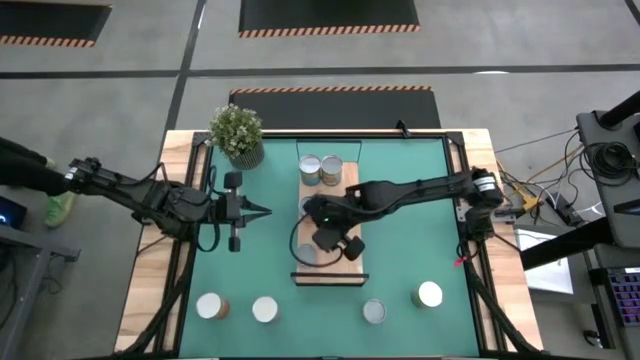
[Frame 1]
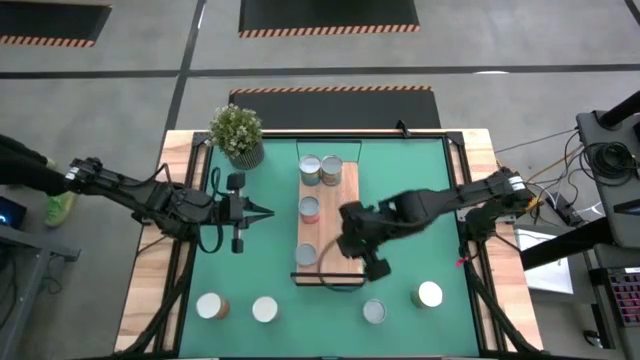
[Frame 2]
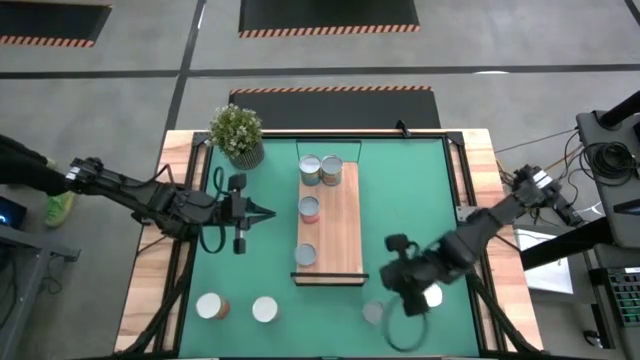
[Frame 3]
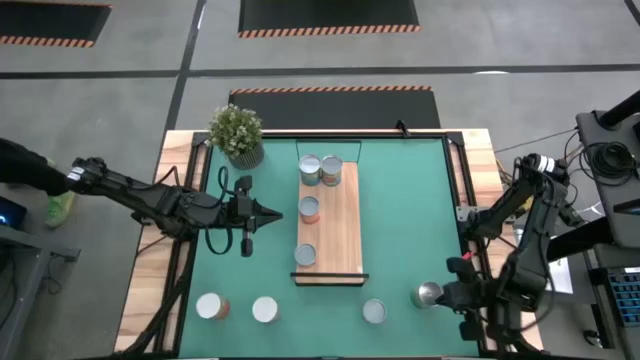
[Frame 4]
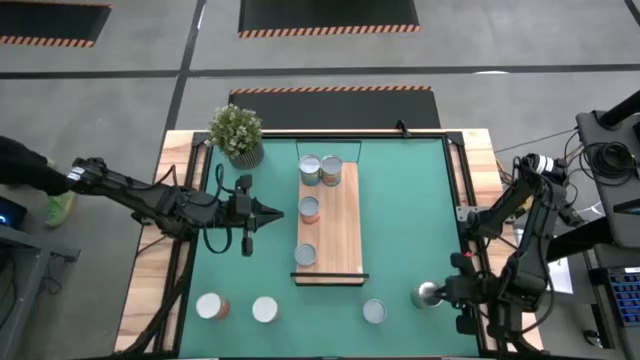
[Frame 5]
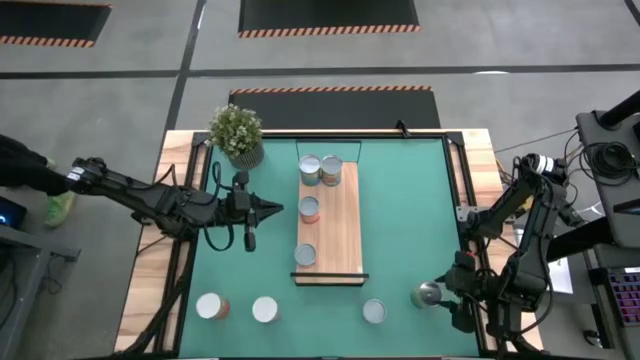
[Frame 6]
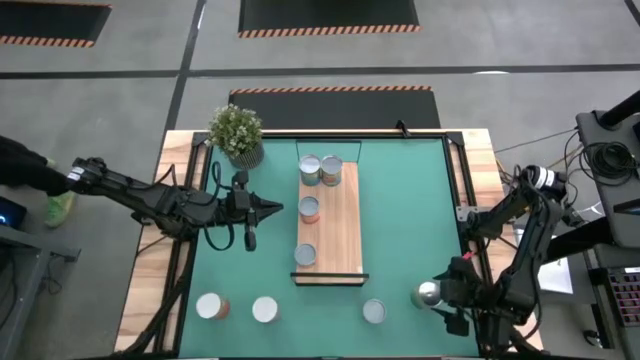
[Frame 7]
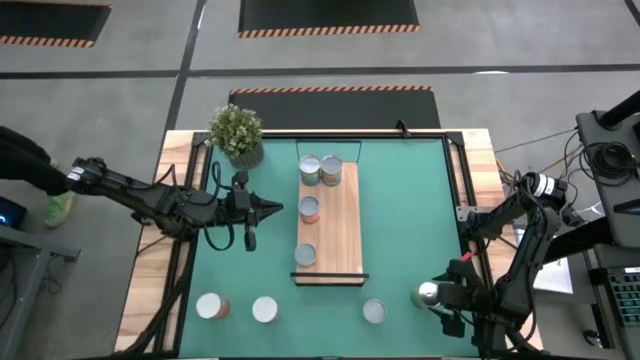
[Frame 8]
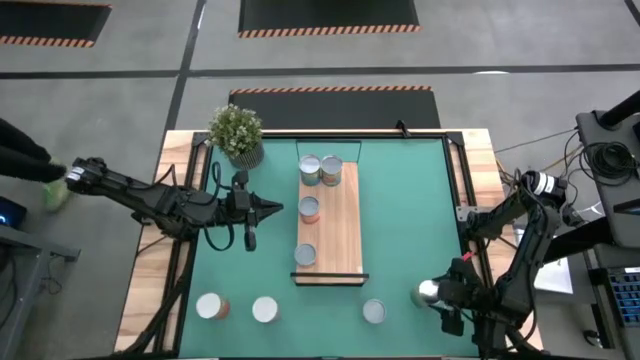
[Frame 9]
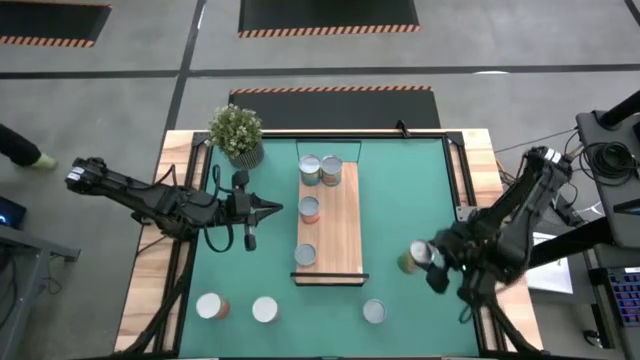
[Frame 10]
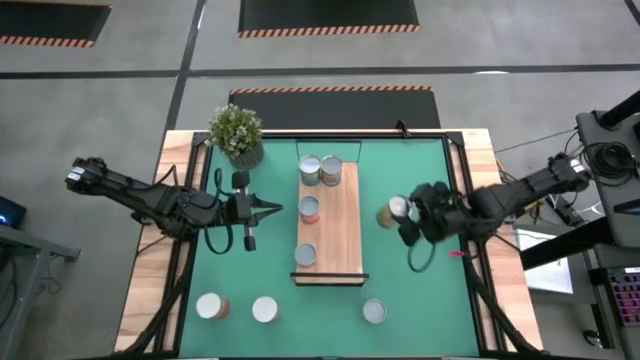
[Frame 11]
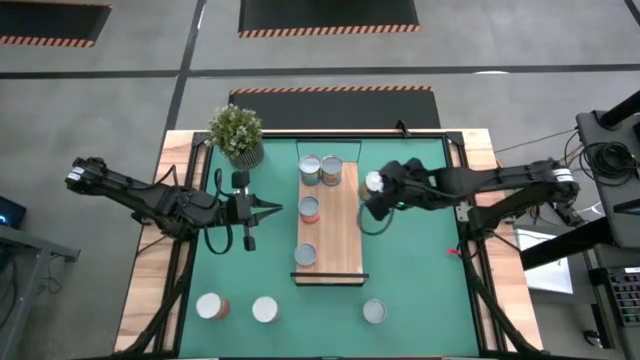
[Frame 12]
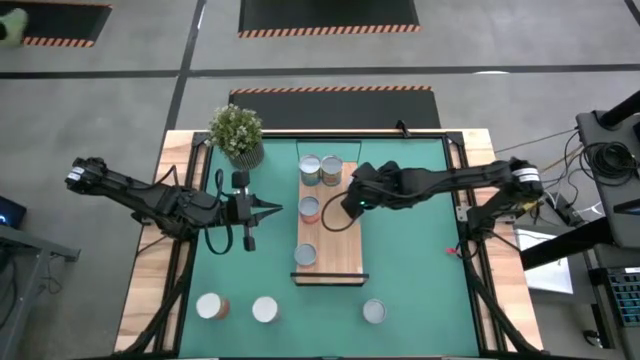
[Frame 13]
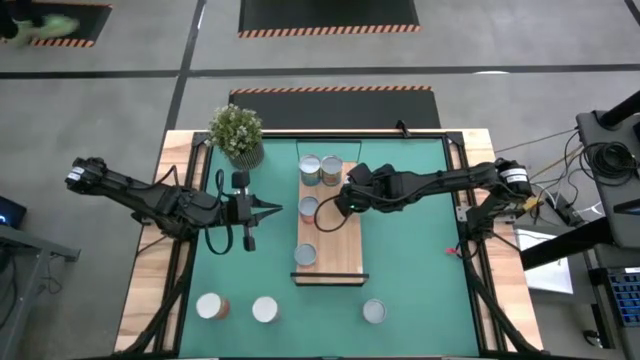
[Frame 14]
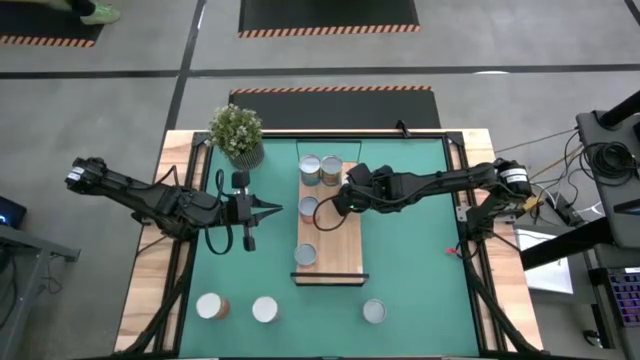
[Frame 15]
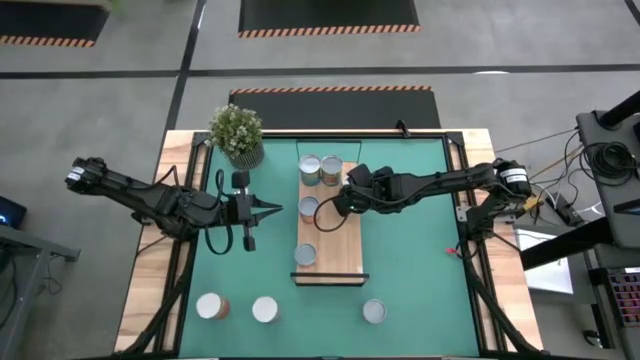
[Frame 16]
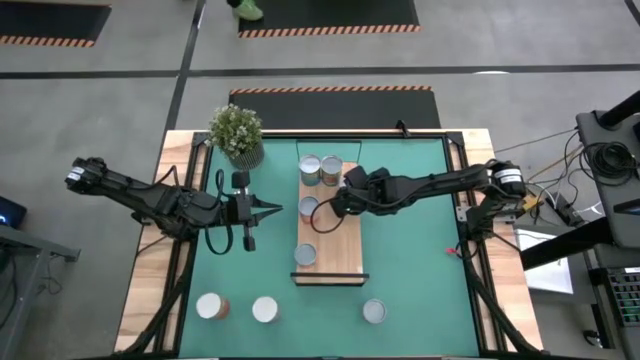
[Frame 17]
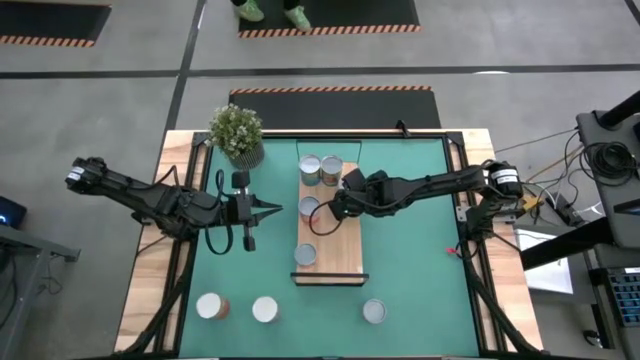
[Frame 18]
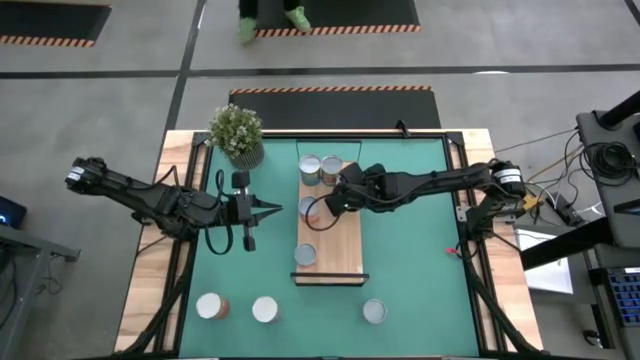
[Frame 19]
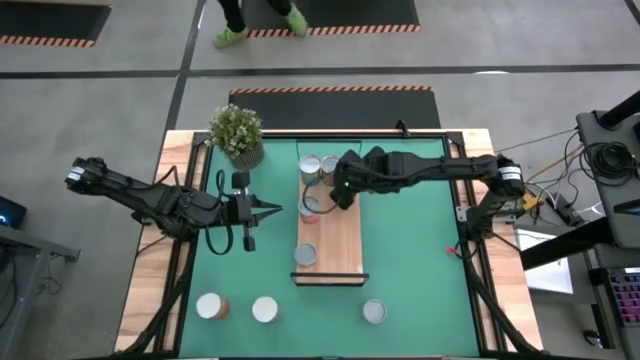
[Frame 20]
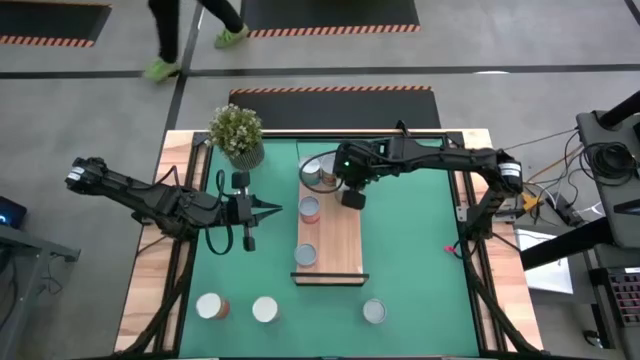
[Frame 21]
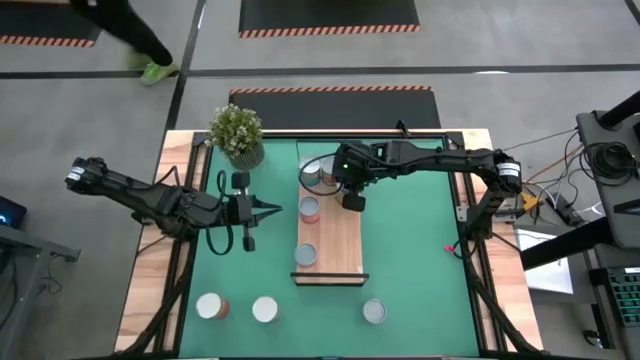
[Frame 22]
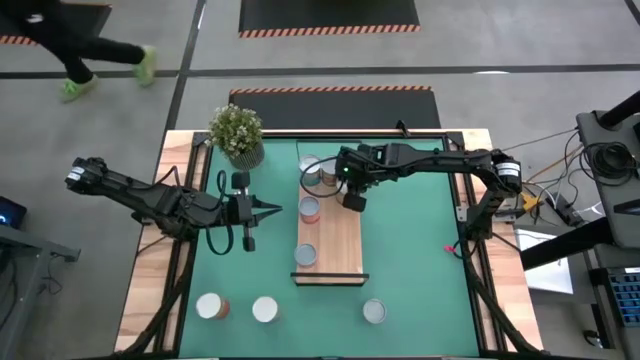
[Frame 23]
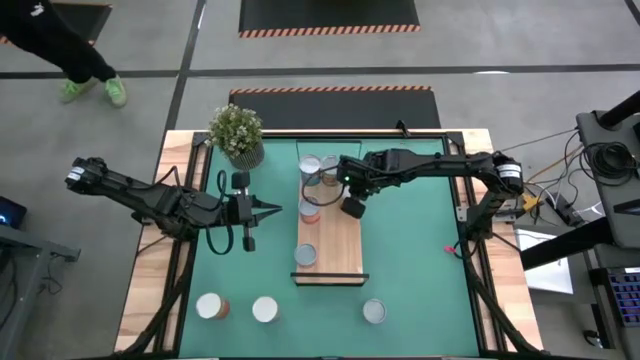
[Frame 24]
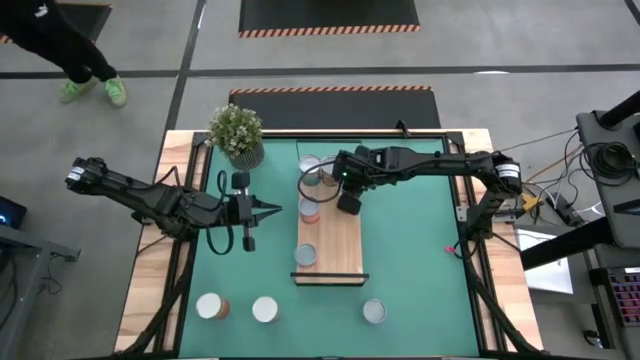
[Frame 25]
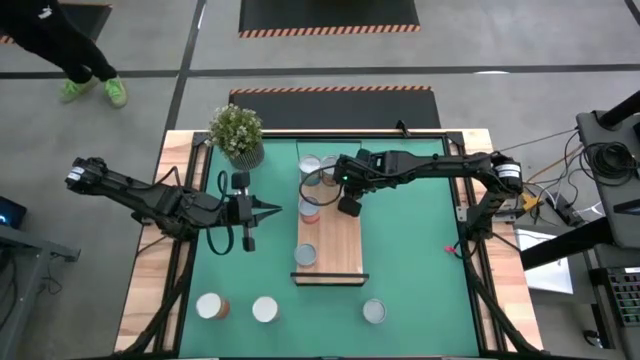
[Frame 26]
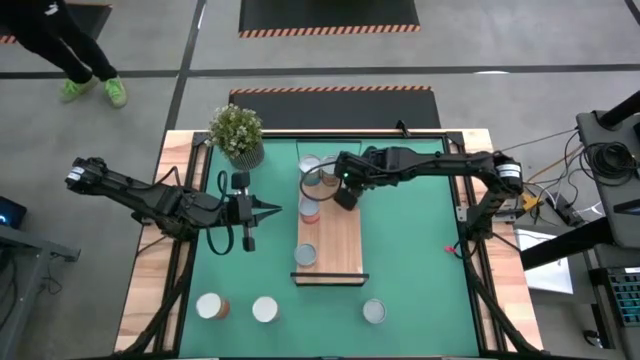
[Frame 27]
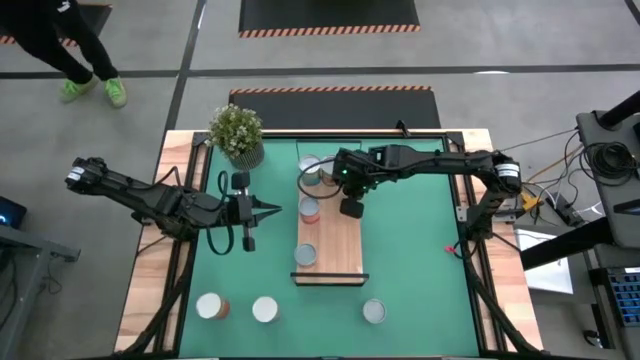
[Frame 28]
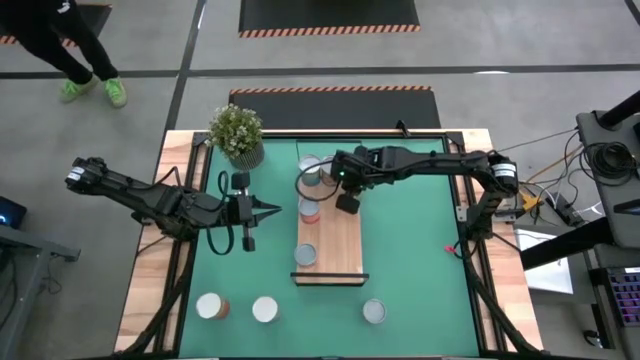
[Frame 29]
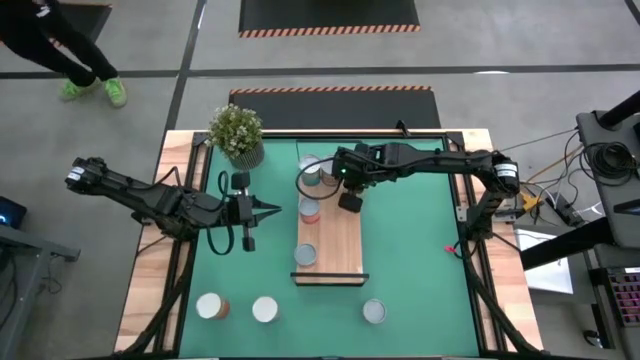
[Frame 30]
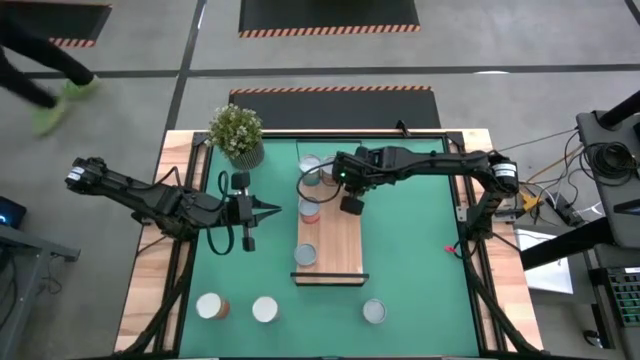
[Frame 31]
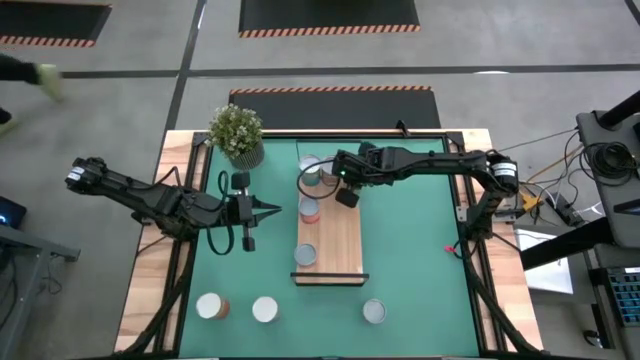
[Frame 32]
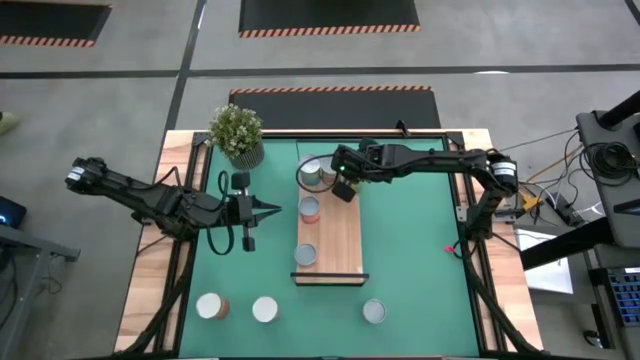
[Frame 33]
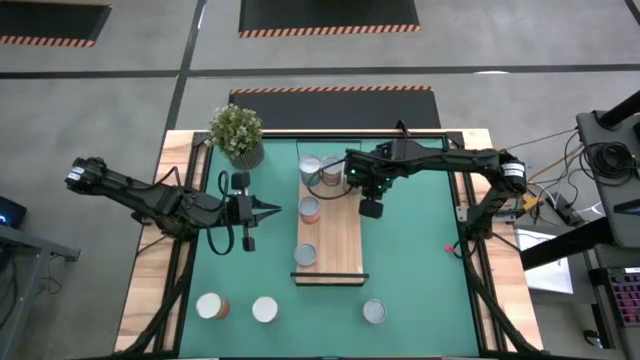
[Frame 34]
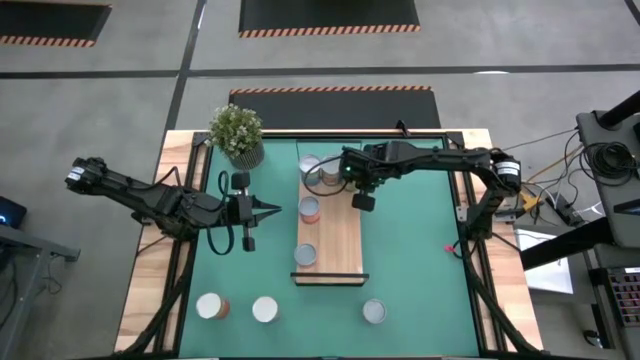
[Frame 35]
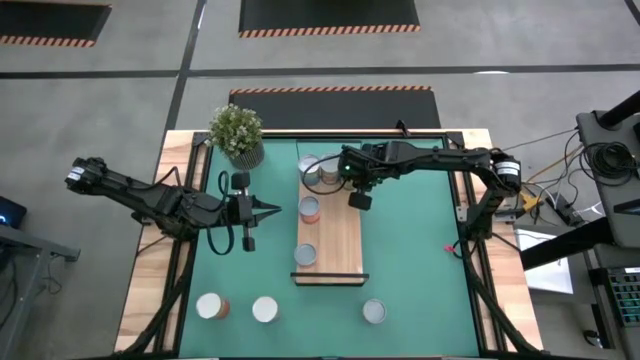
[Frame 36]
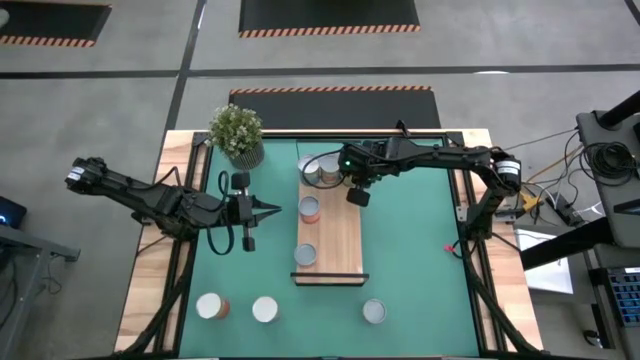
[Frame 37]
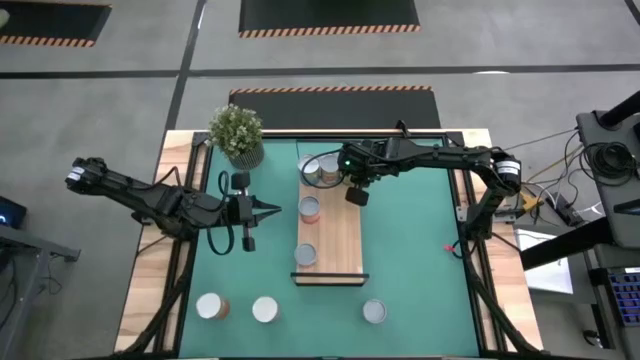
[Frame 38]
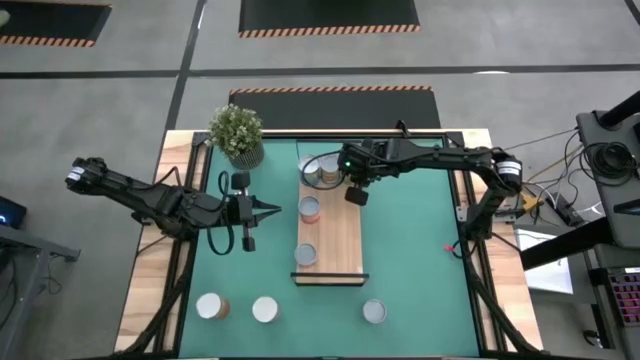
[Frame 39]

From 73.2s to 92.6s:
Task: Pick and place cans onto a shelf
Put the canned oranges on the shelf

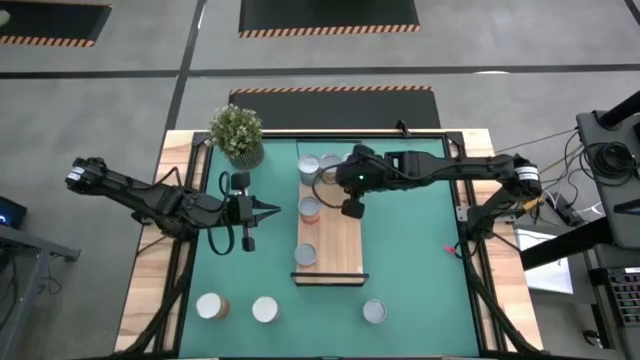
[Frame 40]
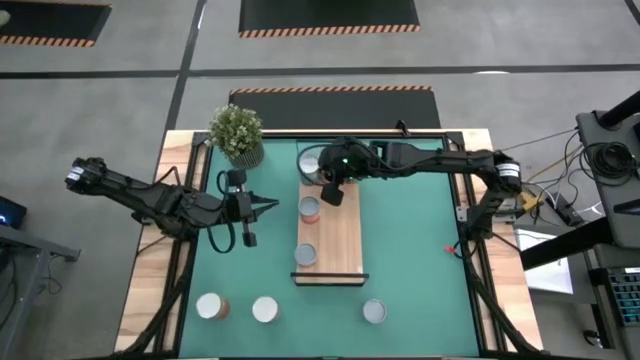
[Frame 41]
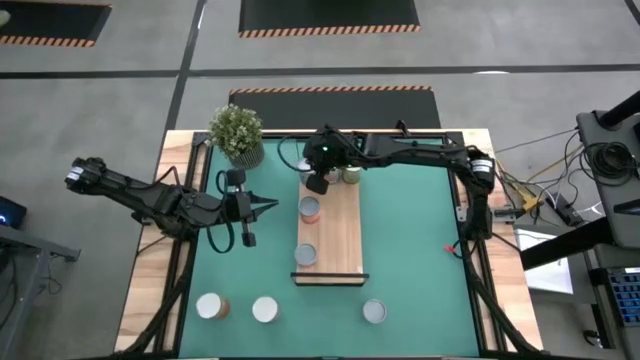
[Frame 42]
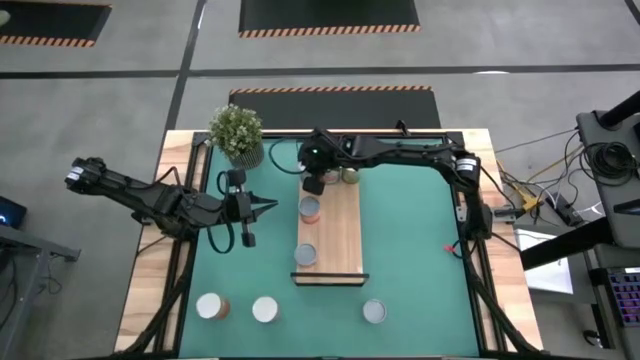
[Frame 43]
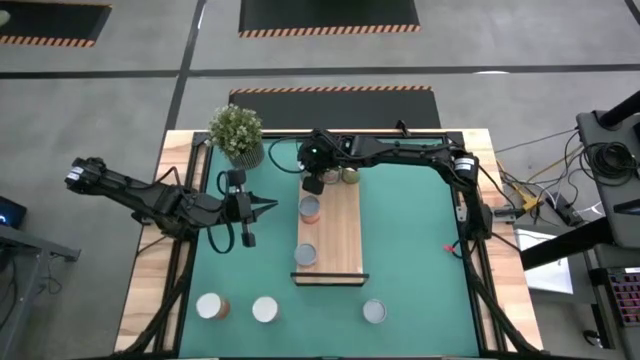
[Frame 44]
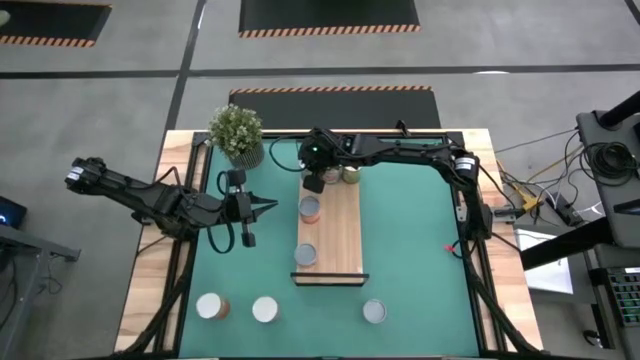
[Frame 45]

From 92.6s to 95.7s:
Adjust the canned cherries on the shelf
